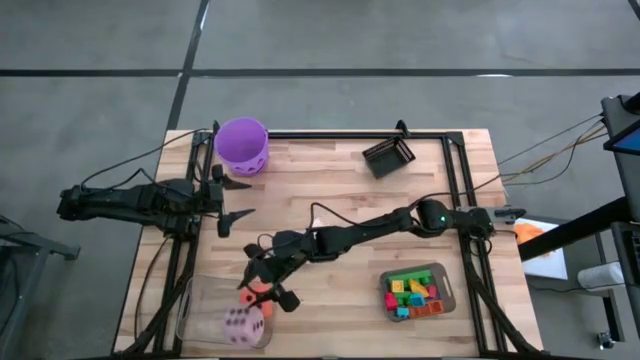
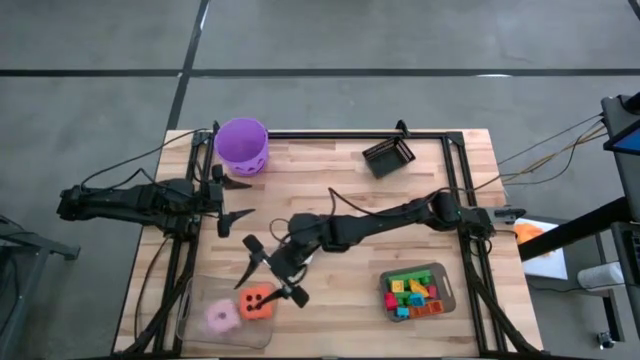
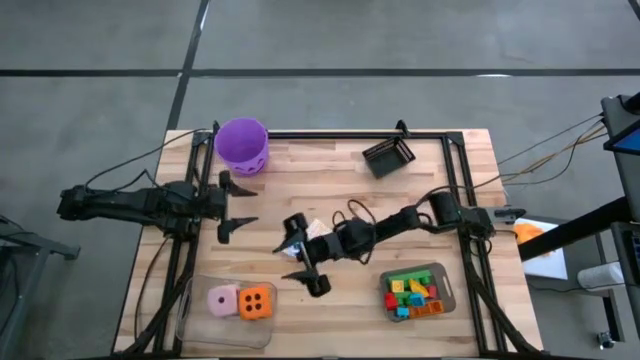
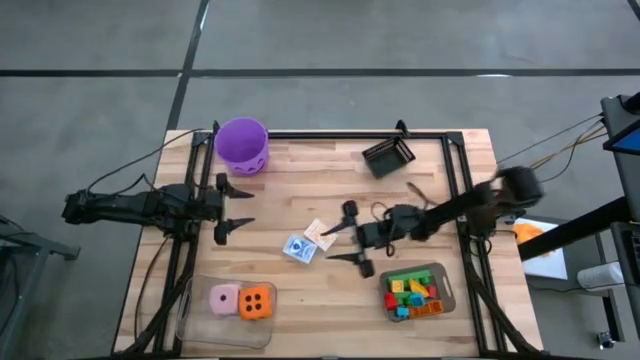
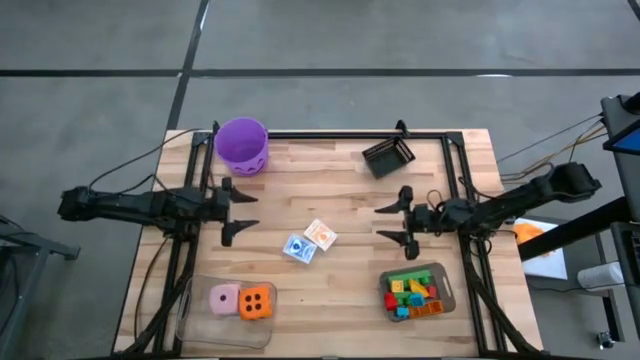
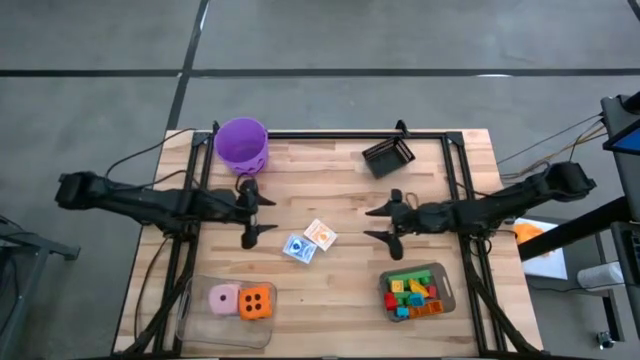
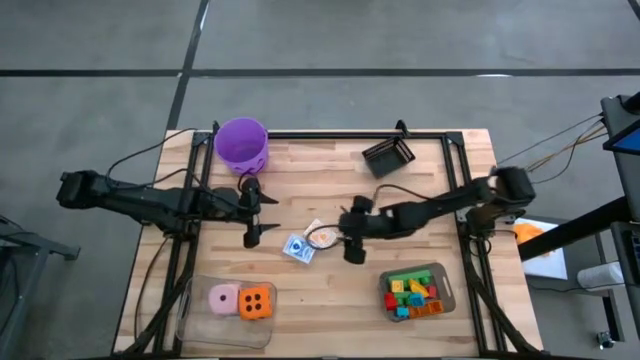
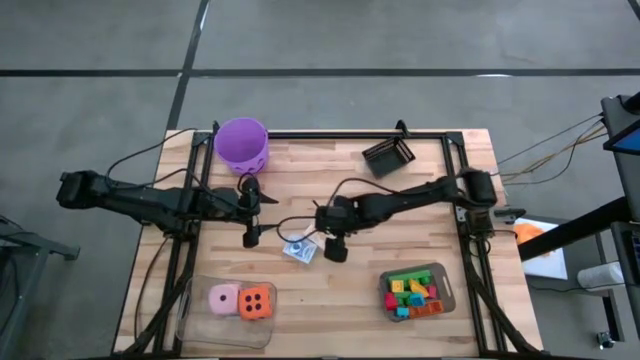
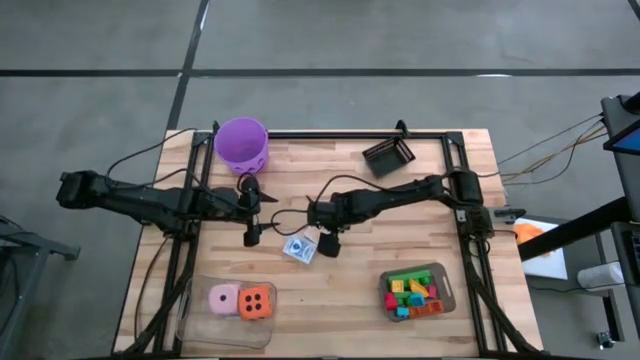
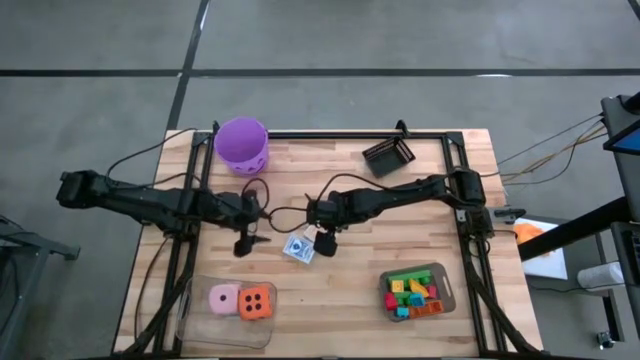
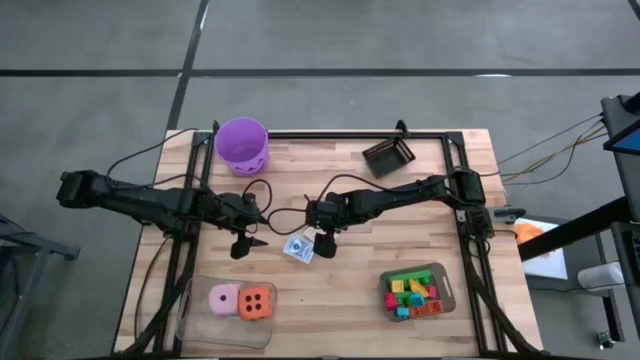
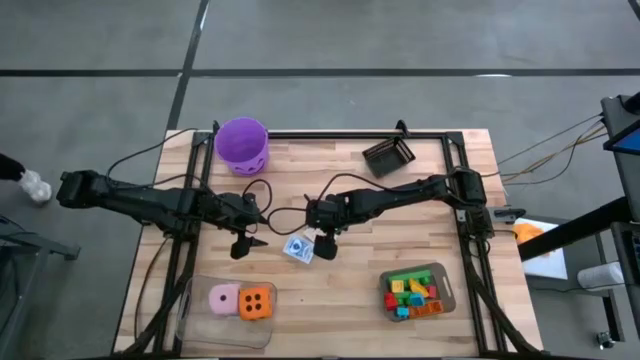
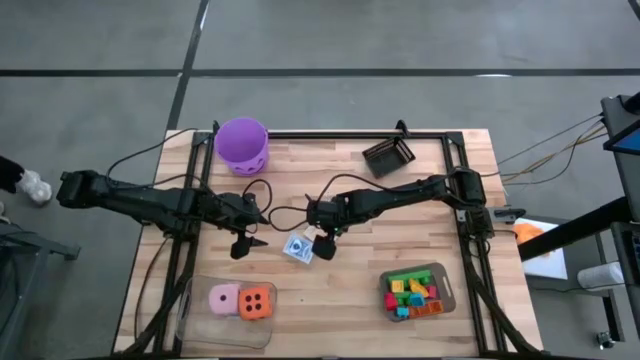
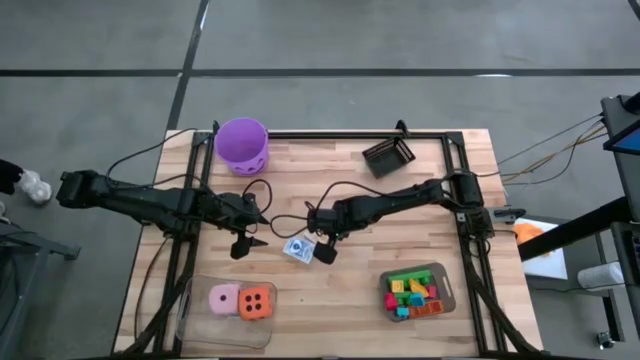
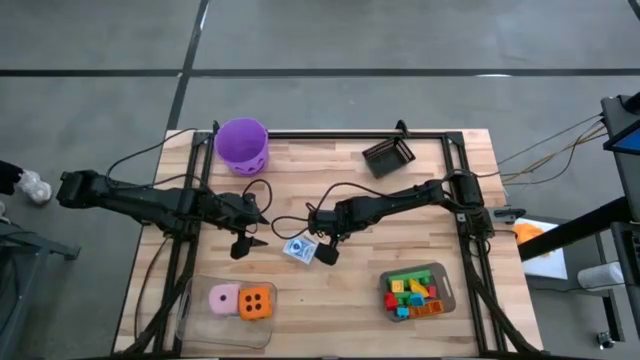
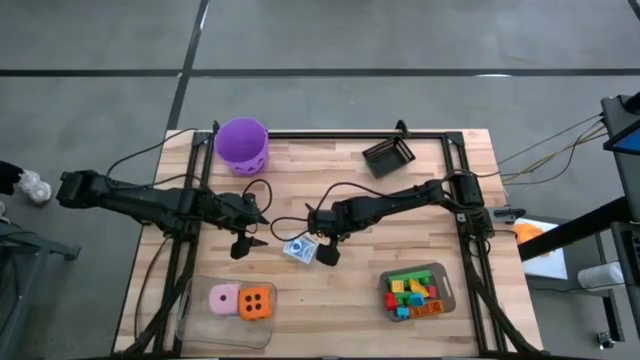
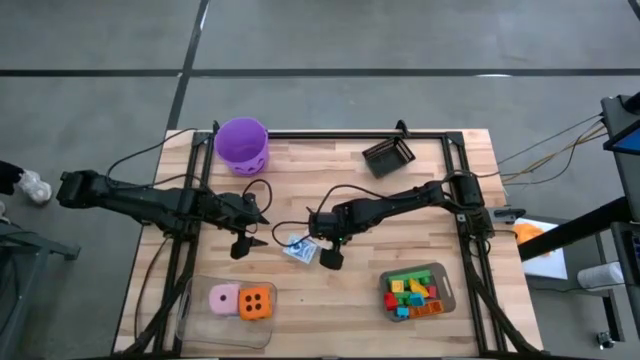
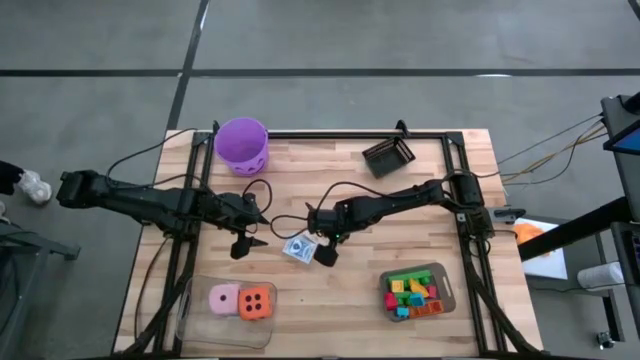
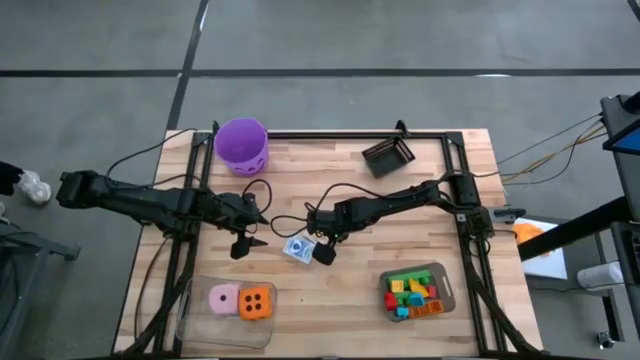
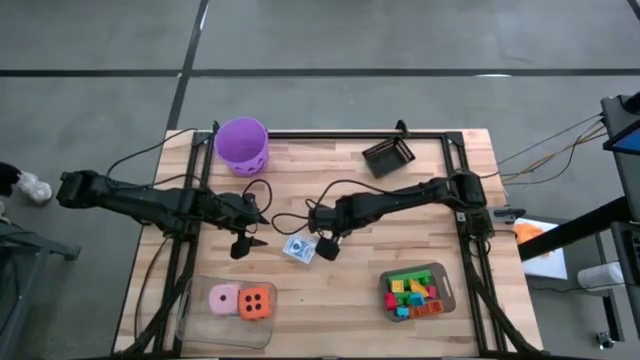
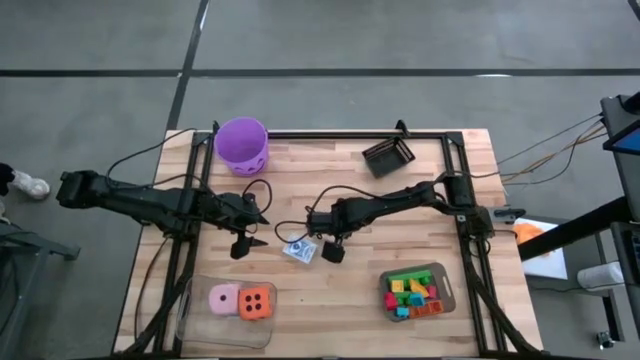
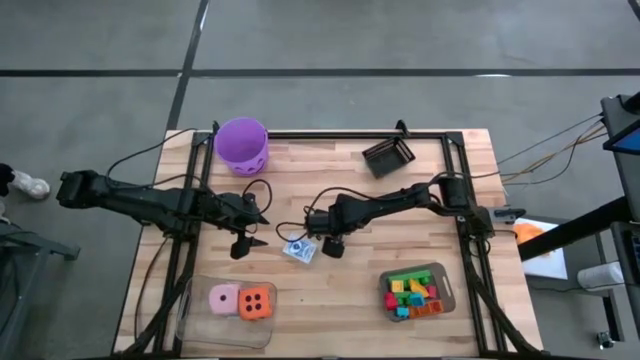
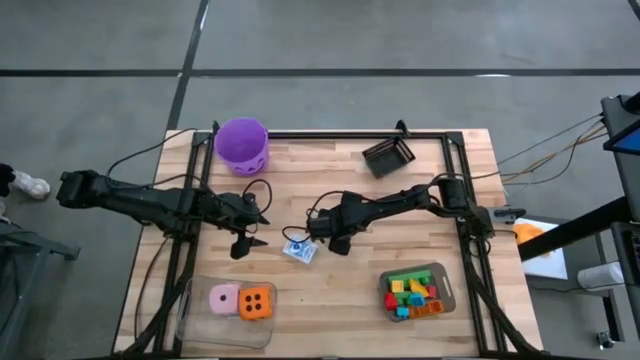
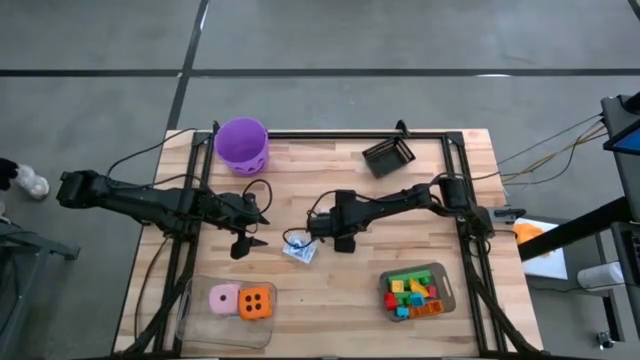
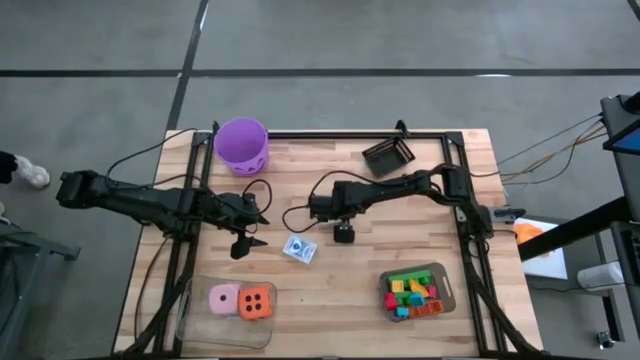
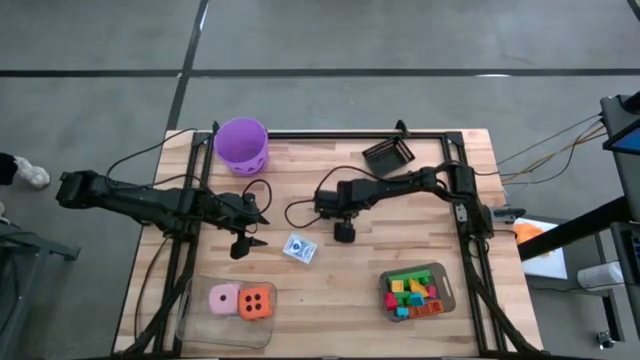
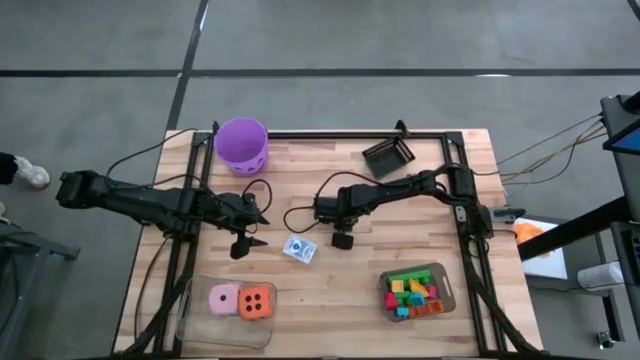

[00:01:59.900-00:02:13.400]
Task: Pick & Place Toys
Put the yellow playing card into the basket bin

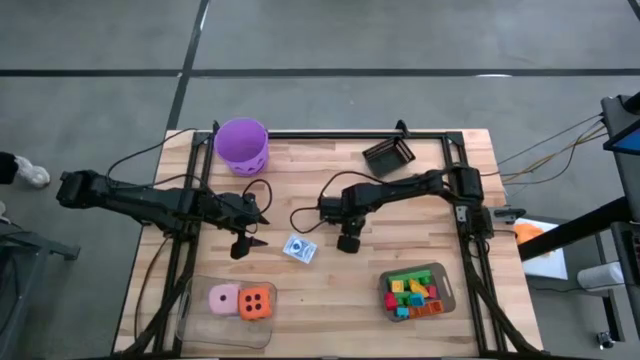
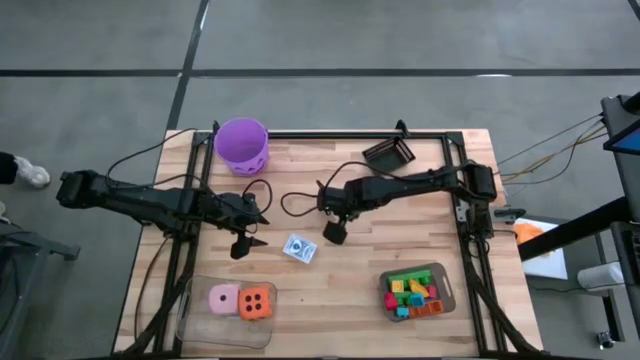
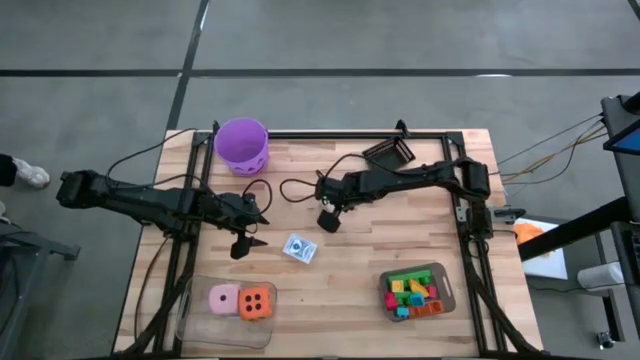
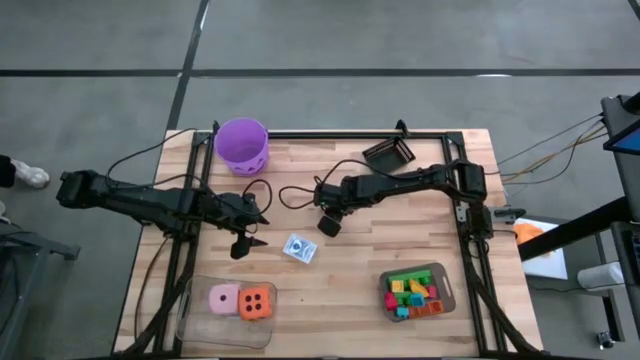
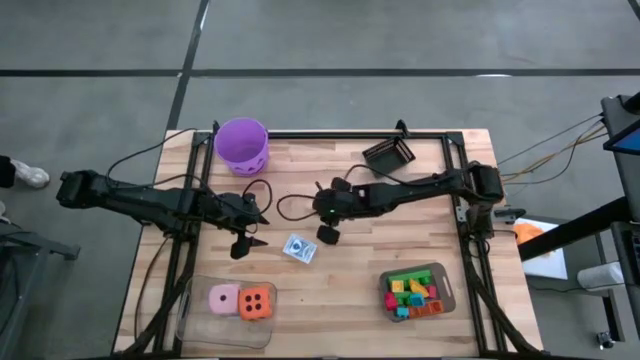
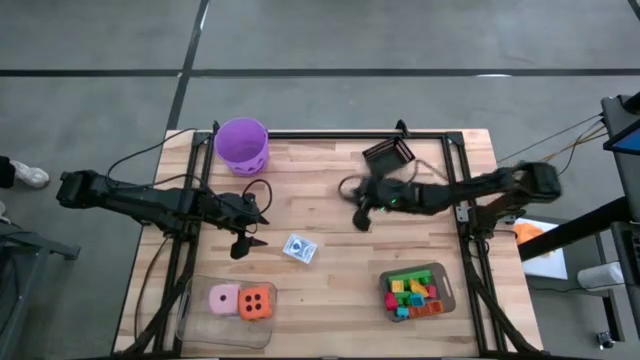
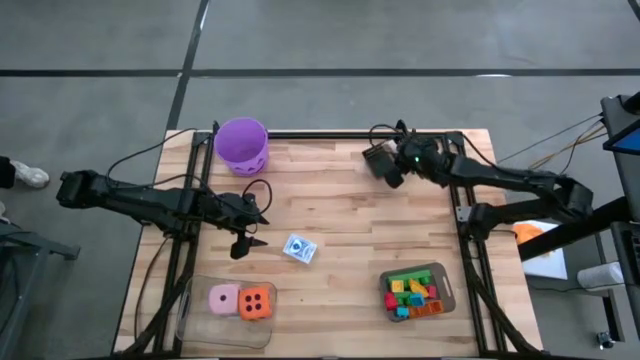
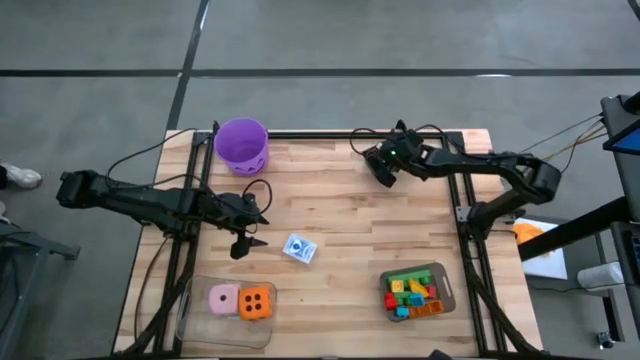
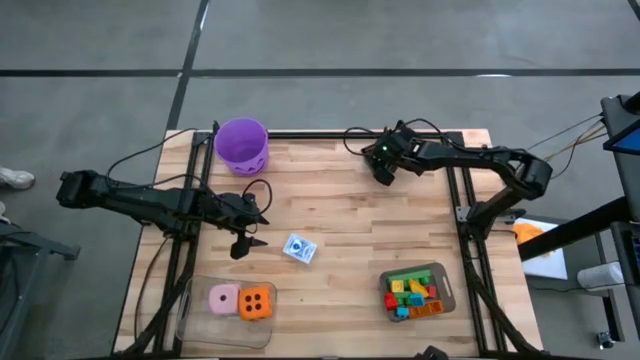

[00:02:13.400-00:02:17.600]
Put the yellow playing card into the basket bin
